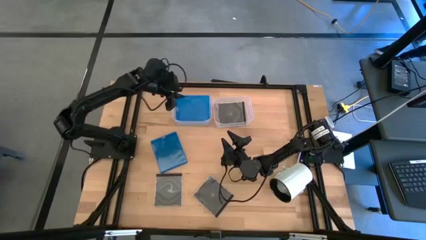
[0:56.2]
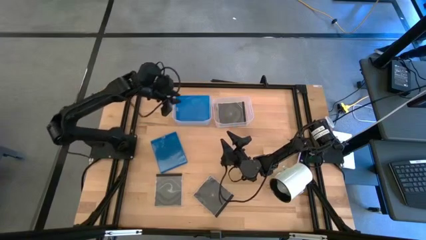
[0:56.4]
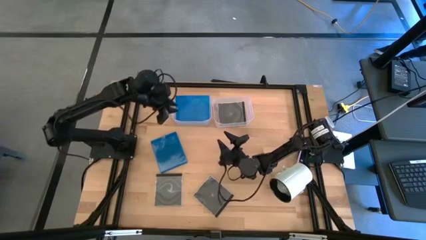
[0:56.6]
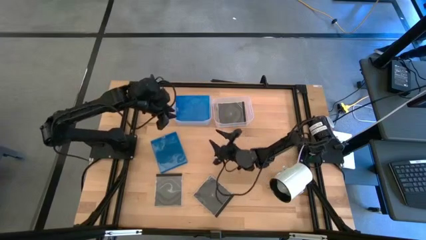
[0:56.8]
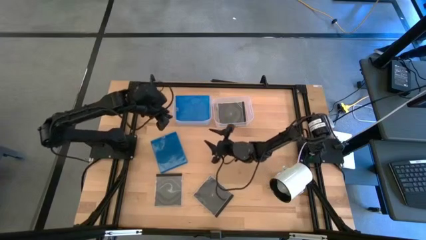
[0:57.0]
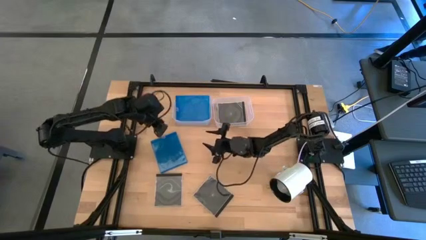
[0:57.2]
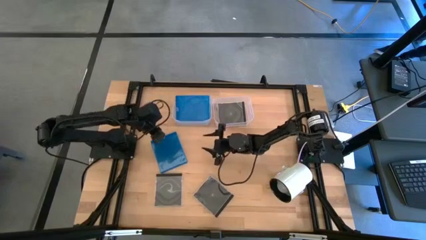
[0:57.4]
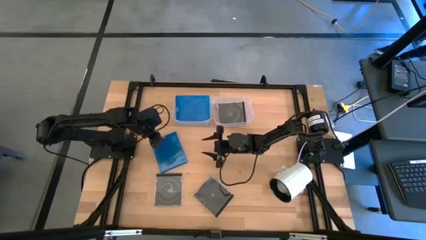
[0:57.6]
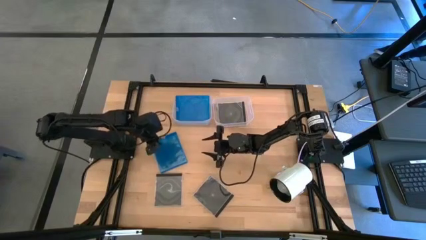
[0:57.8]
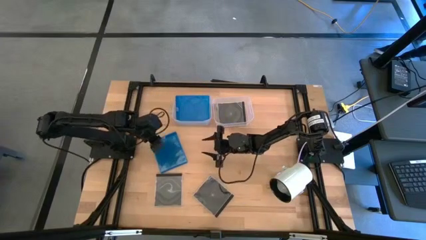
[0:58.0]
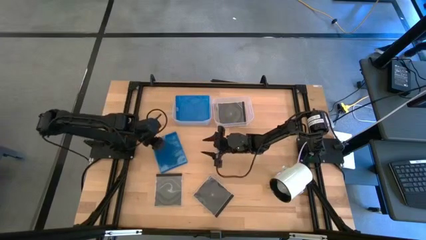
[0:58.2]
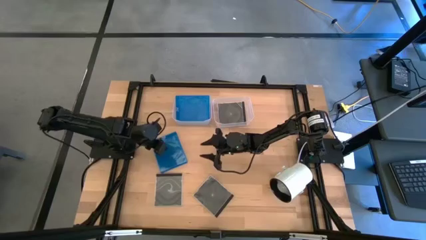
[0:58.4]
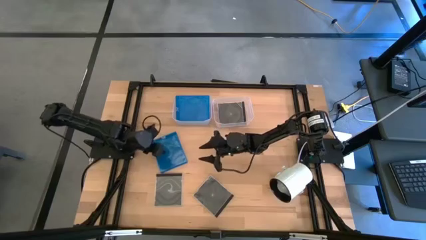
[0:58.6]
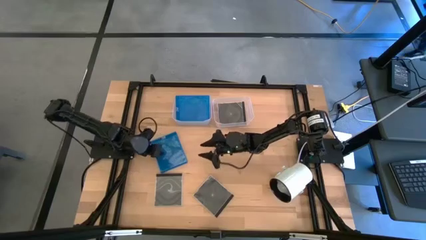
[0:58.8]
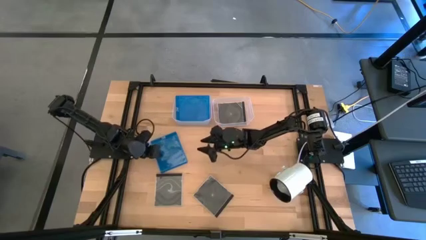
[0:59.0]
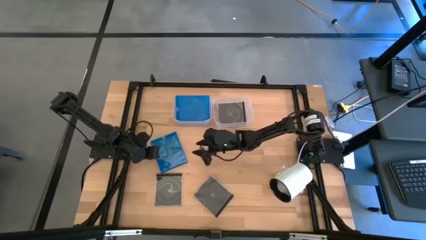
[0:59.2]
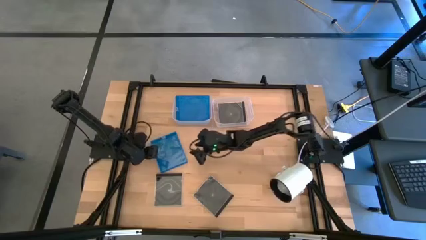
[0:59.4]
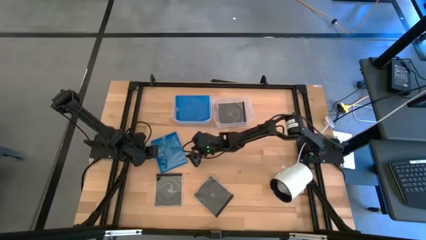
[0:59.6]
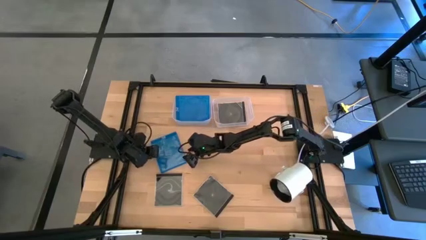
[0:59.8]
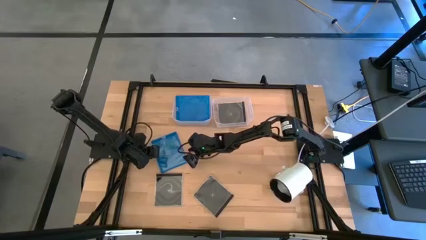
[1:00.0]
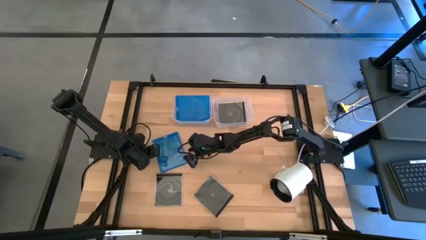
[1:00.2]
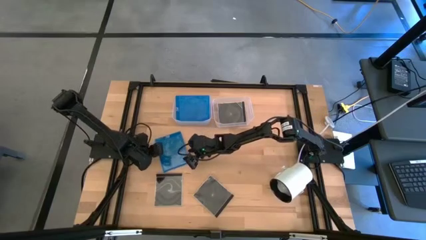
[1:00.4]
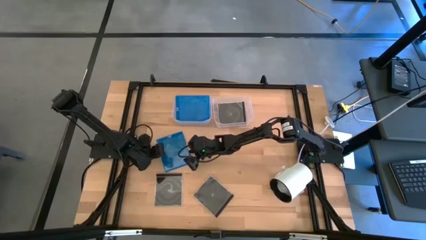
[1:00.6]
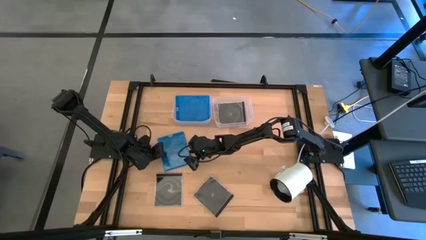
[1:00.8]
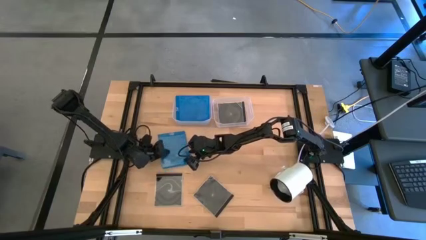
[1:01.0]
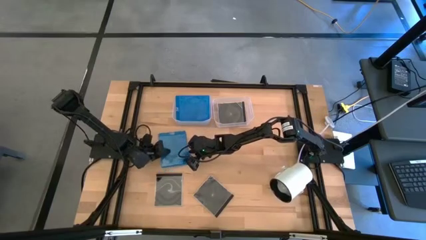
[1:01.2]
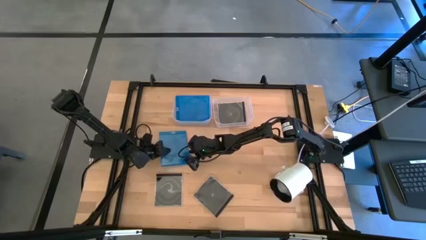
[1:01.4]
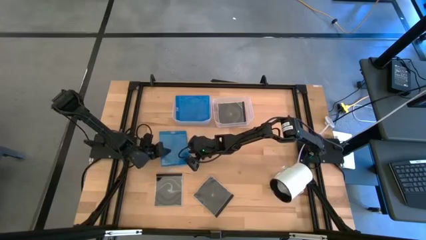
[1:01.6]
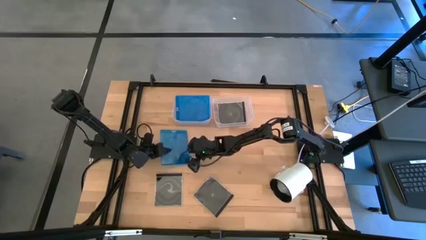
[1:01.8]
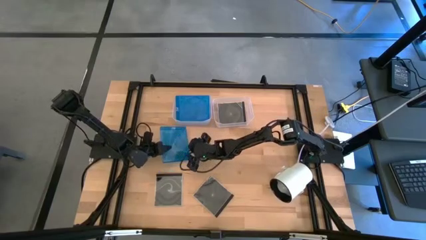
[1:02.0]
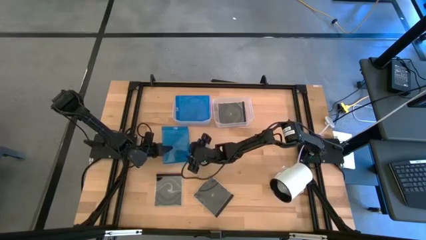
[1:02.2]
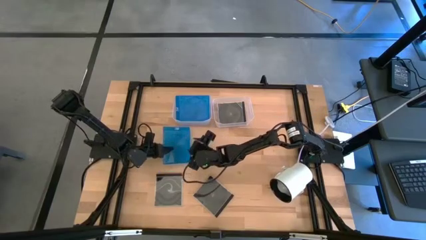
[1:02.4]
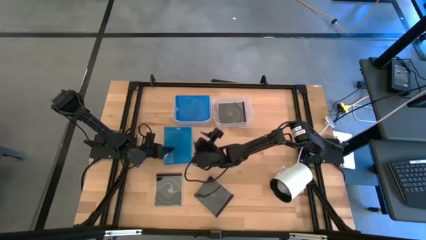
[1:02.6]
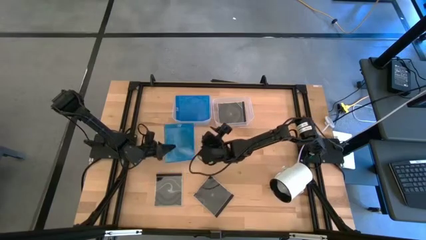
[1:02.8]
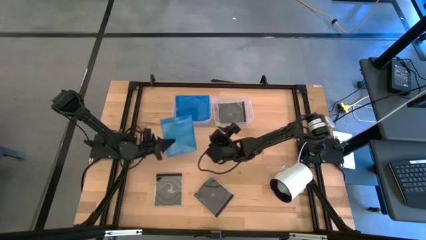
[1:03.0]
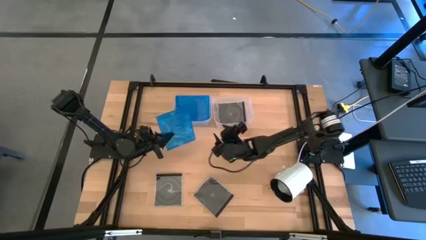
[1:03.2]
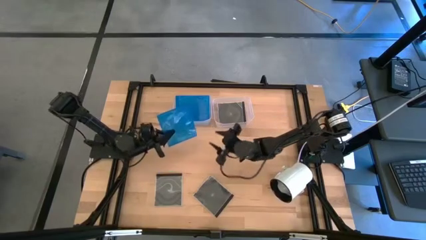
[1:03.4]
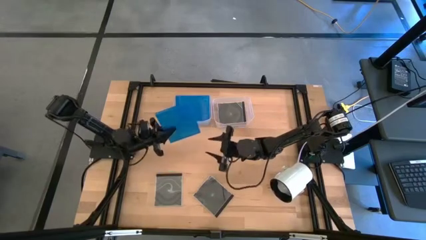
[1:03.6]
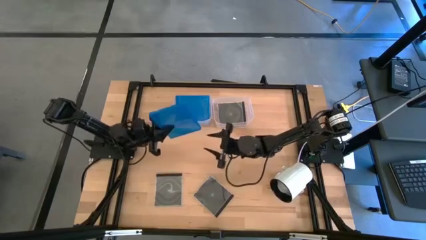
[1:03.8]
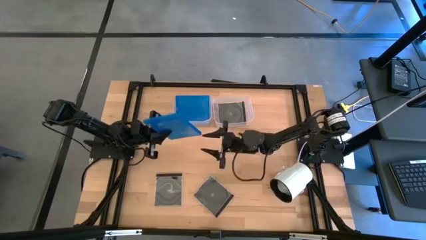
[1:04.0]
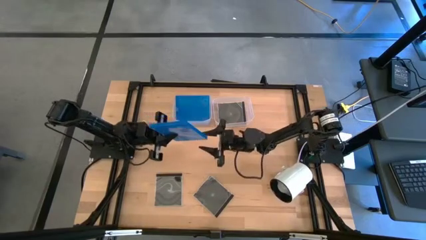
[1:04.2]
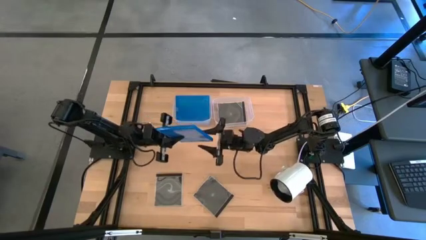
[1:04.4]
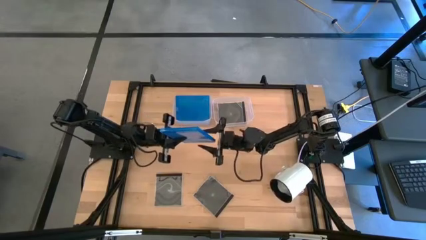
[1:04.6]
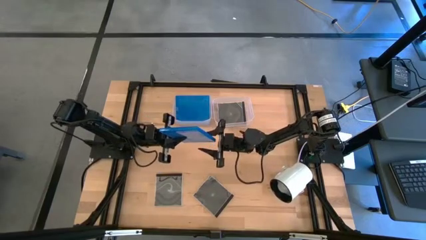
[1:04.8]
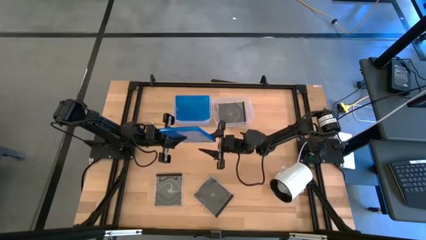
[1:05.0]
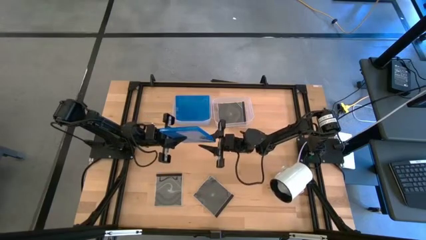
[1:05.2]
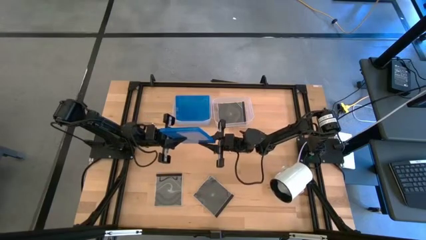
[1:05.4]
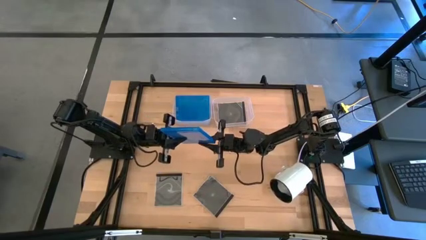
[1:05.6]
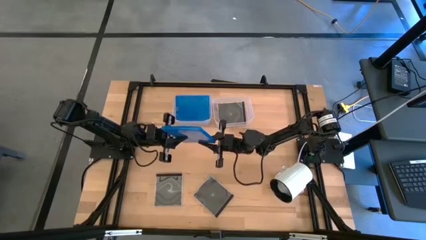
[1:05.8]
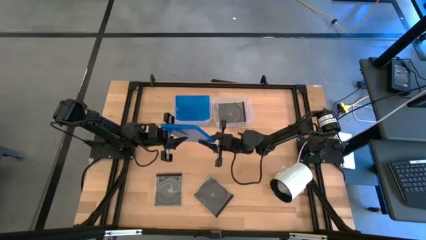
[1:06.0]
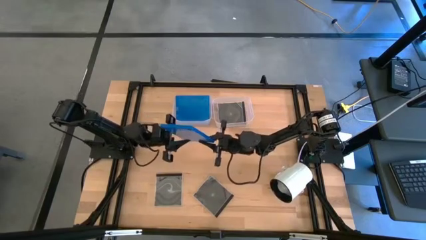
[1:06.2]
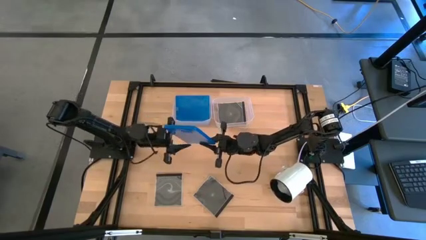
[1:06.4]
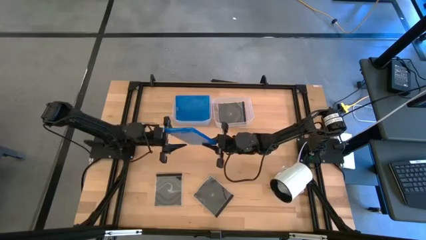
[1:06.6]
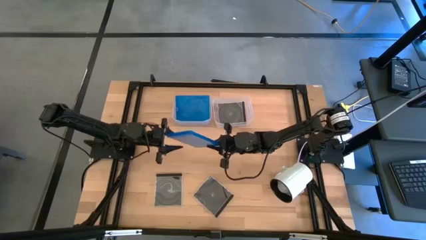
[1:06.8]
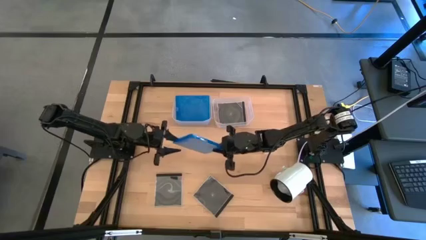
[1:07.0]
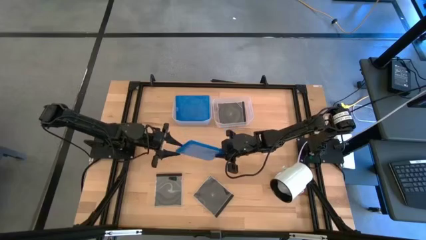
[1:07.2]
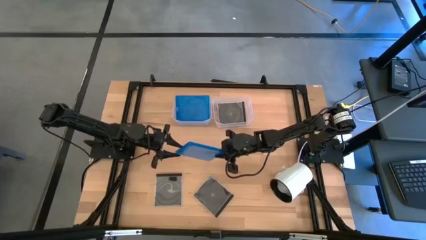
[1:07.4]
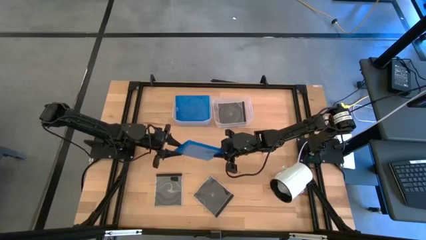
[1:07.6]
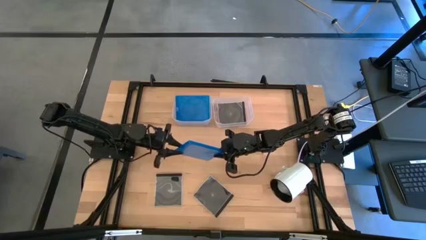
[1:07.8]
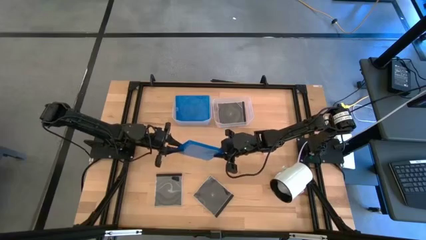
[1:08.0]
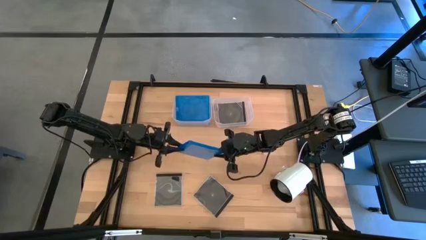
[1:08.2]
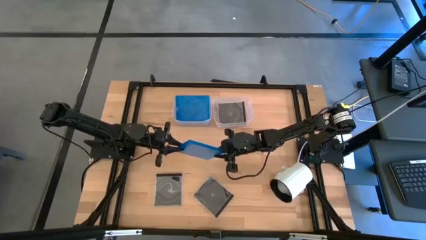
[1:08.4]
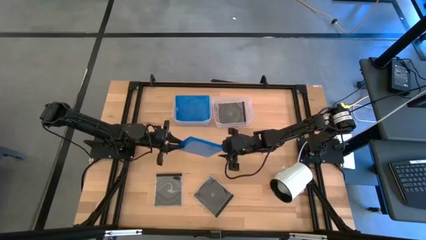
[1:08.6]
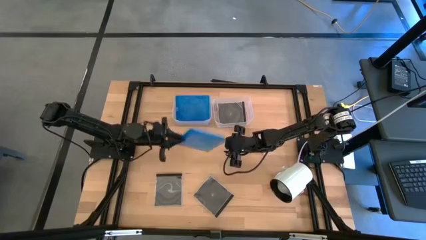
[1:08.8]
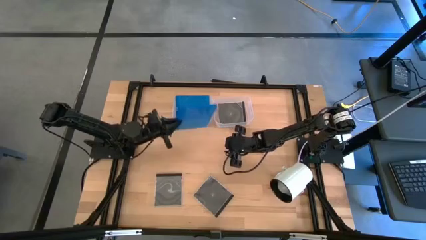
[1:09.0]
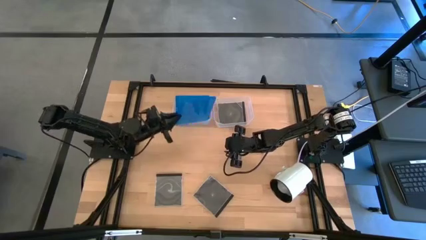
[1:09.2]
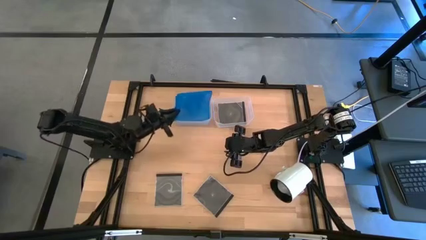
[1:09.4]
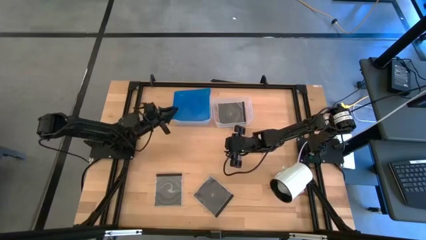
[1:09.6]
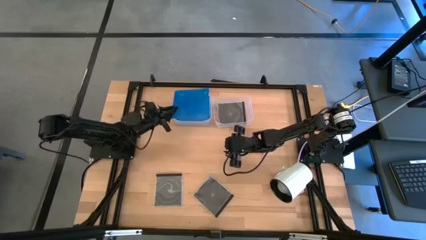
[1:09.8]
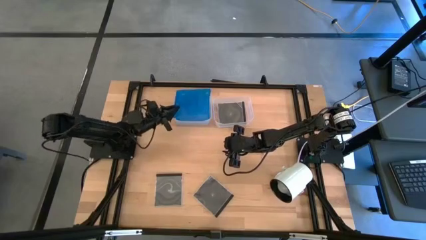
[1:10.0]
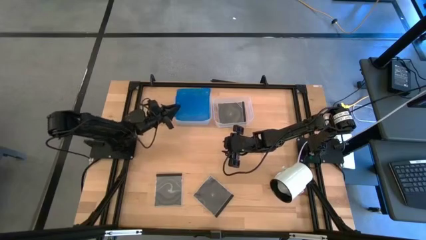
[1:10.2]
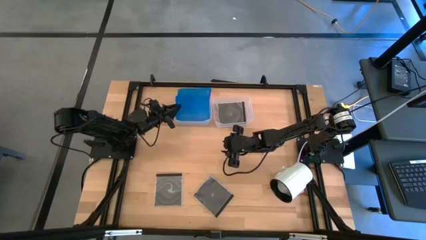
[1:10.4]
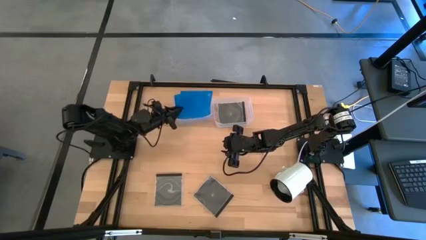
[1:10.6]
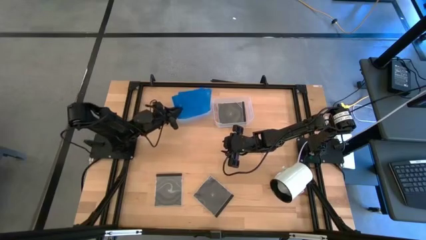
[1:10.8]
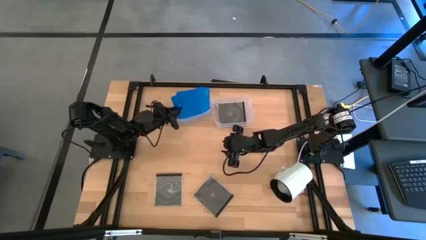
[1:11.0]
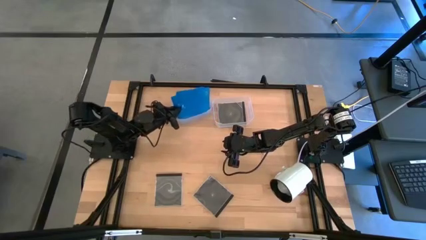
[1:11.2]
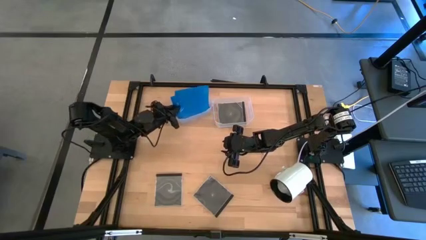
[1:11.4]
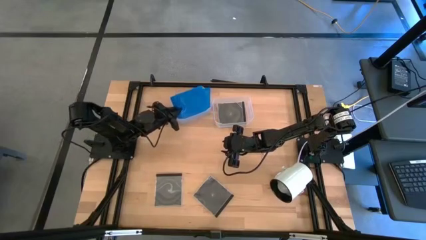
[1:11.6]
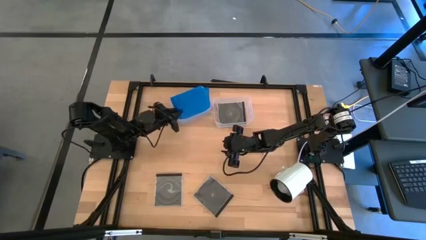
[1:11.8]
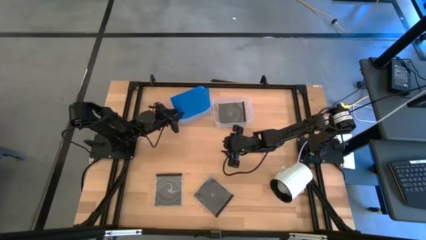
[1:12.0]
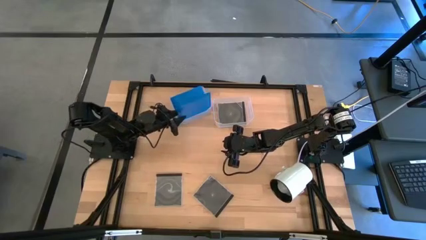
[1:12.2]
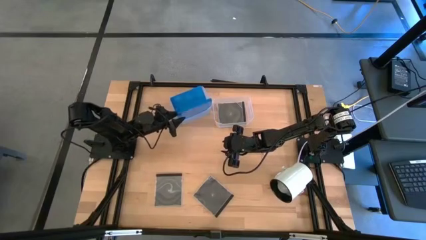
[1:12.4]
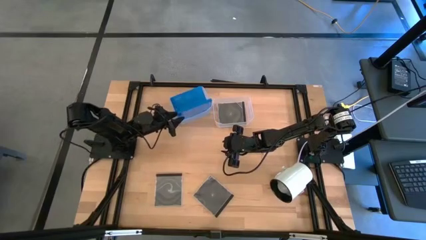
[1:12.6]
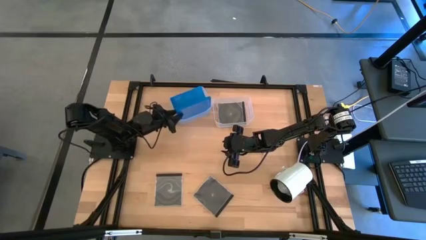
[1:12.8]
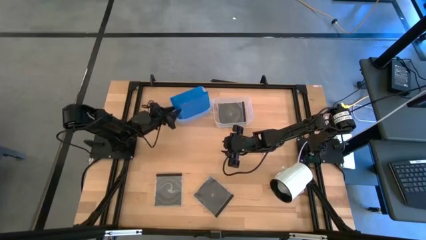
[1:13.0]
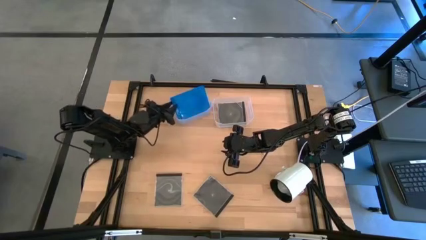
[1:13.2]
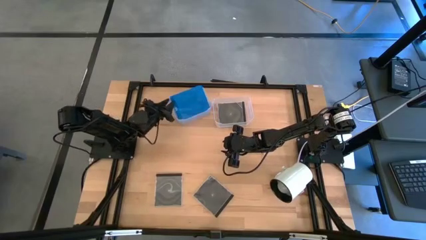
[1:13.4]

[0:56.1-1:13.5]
Task: Pick & place jewel cases by type
Put the blue CD case into the left transparent bin
